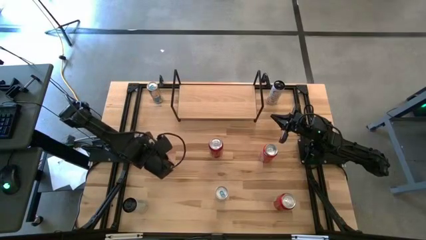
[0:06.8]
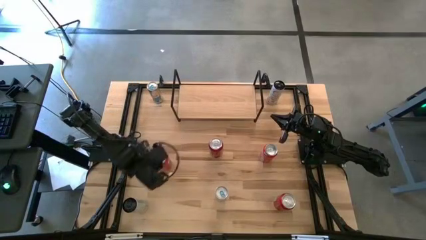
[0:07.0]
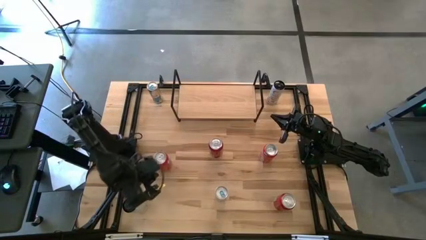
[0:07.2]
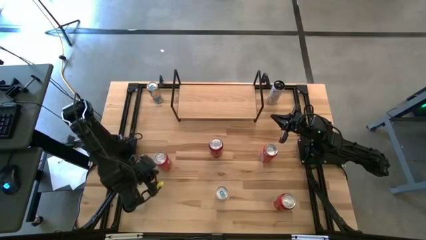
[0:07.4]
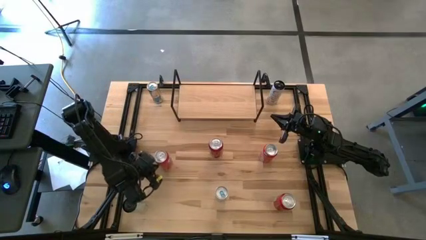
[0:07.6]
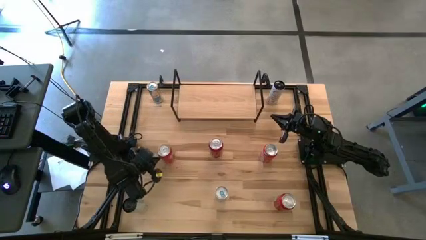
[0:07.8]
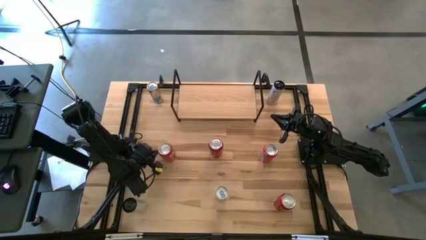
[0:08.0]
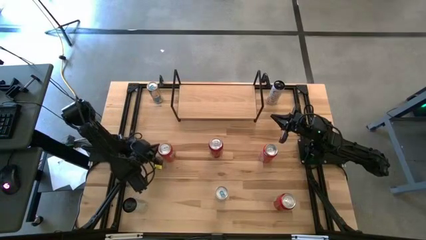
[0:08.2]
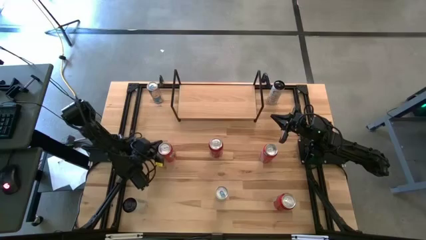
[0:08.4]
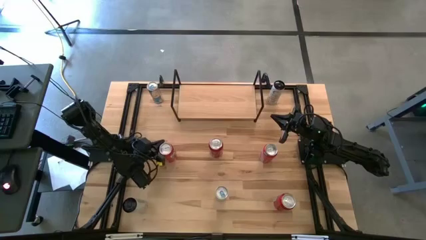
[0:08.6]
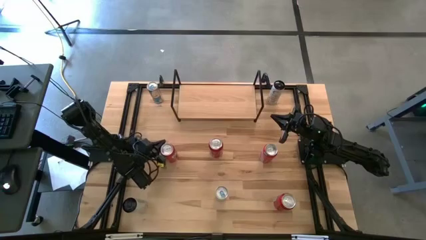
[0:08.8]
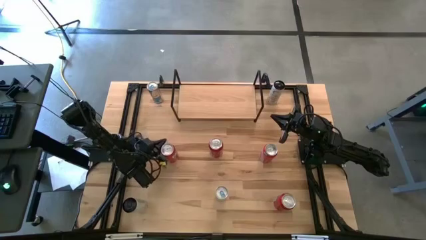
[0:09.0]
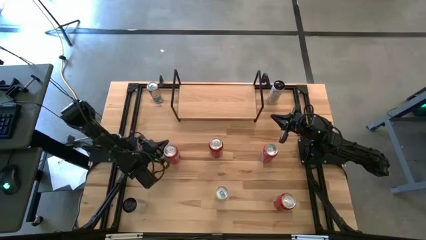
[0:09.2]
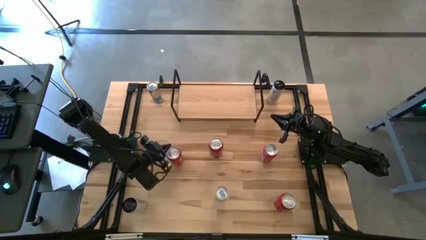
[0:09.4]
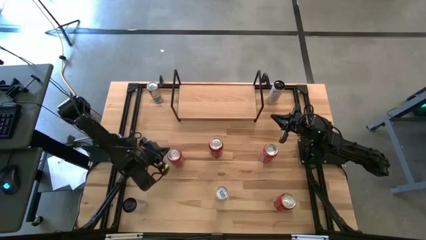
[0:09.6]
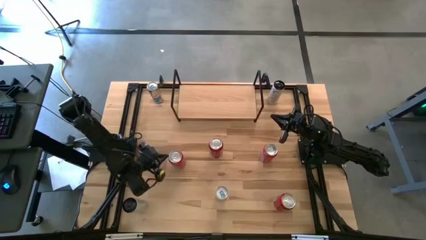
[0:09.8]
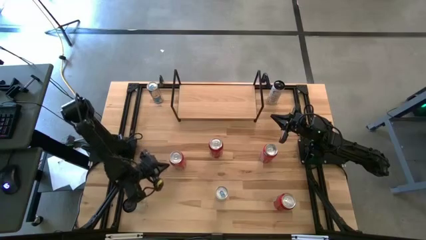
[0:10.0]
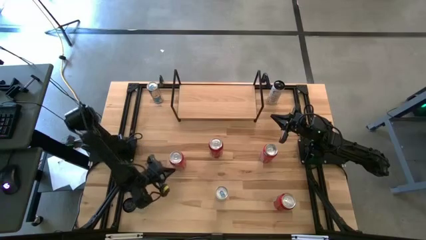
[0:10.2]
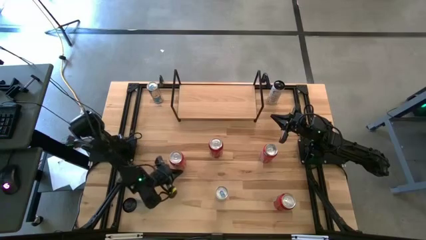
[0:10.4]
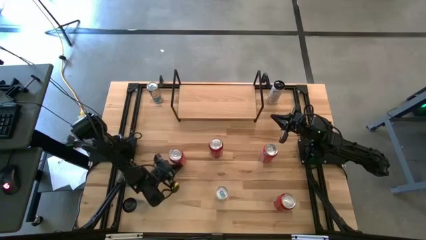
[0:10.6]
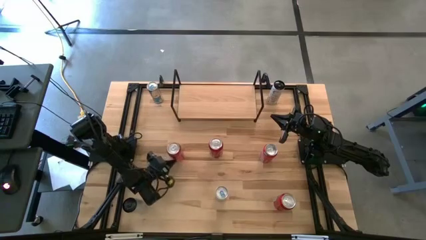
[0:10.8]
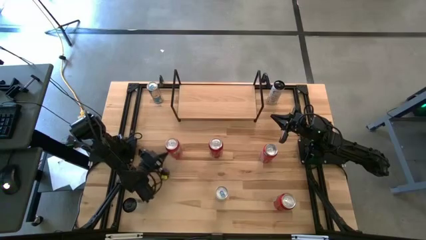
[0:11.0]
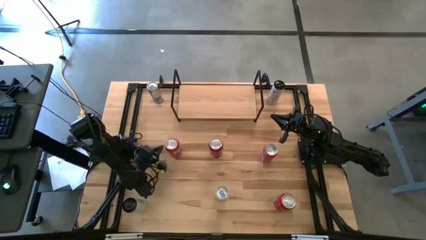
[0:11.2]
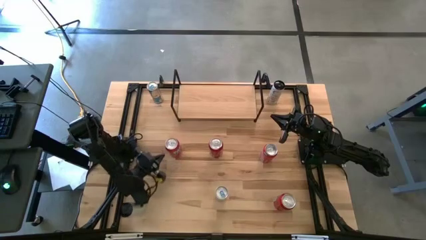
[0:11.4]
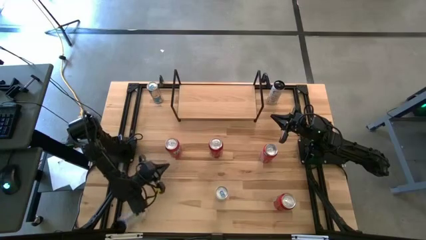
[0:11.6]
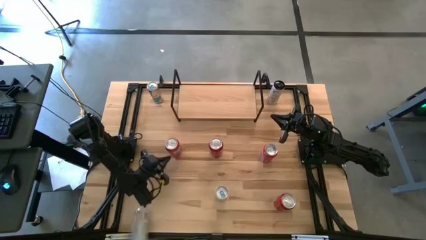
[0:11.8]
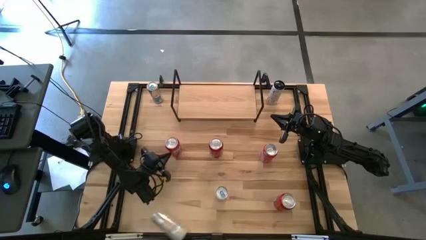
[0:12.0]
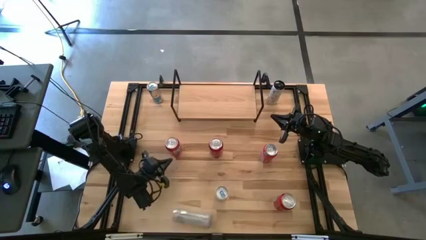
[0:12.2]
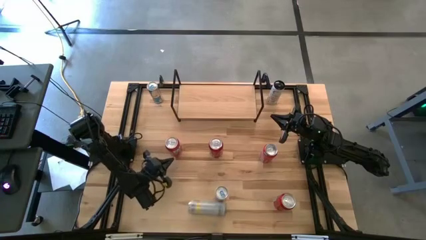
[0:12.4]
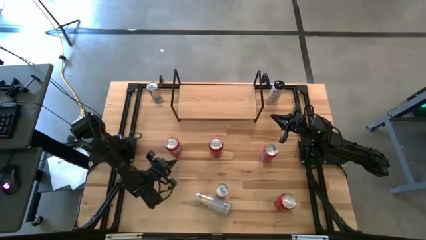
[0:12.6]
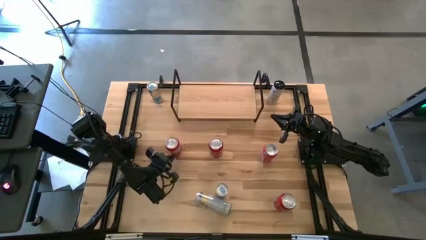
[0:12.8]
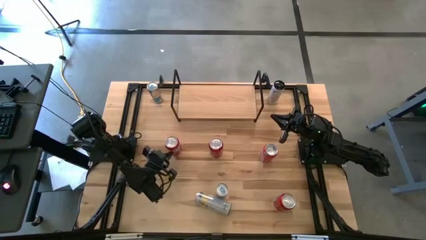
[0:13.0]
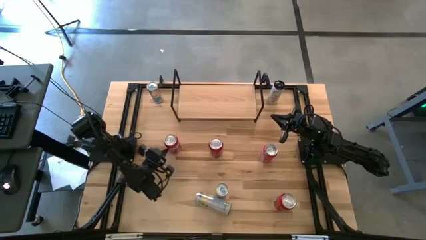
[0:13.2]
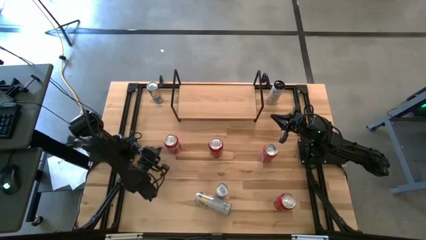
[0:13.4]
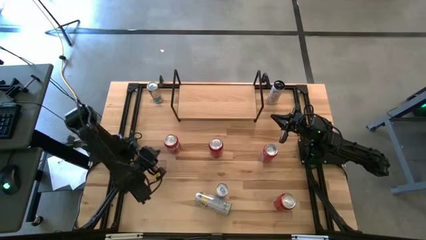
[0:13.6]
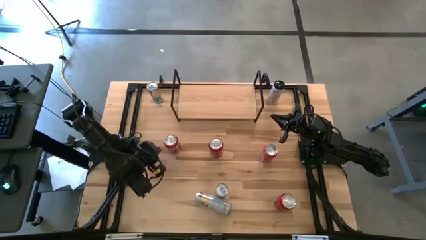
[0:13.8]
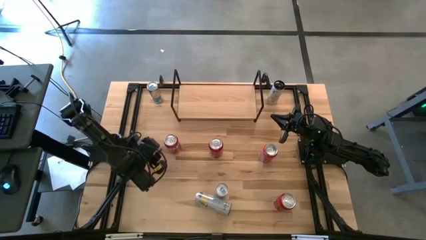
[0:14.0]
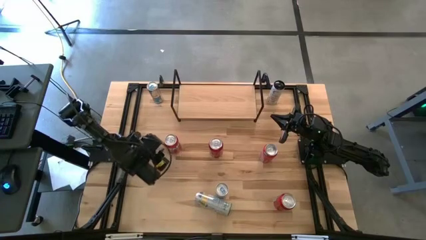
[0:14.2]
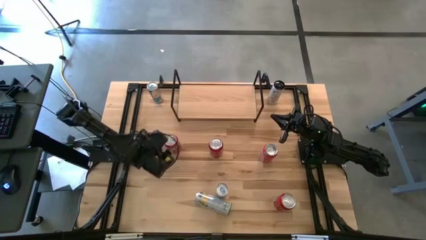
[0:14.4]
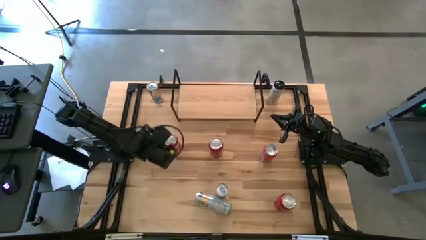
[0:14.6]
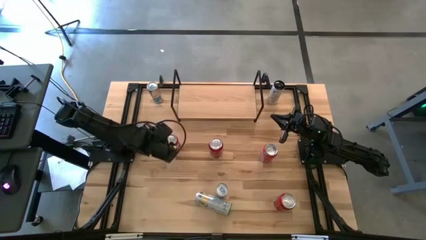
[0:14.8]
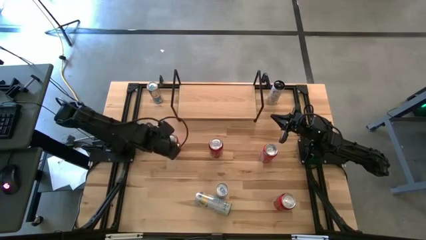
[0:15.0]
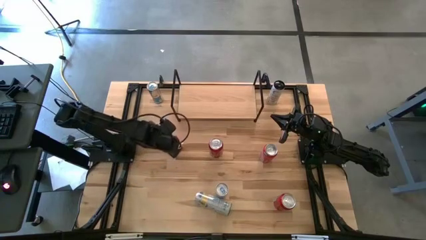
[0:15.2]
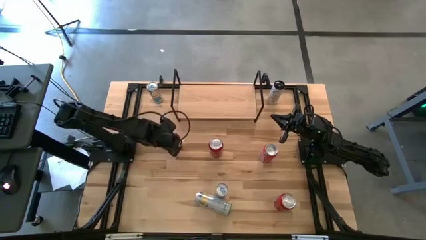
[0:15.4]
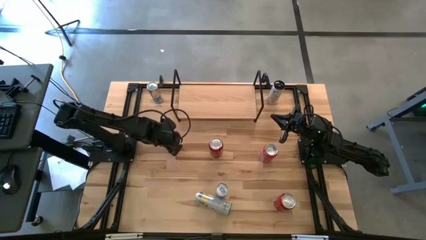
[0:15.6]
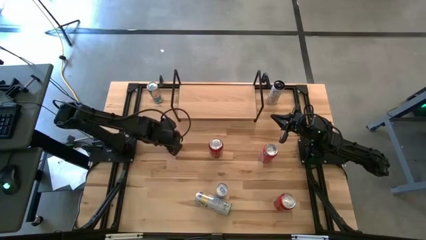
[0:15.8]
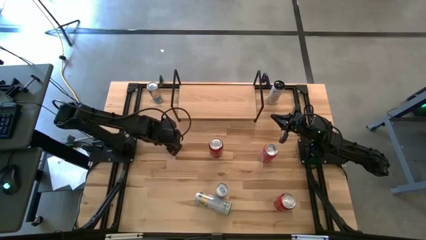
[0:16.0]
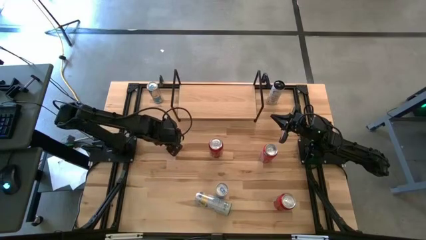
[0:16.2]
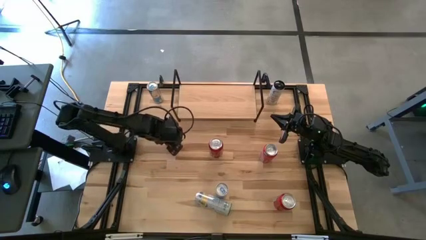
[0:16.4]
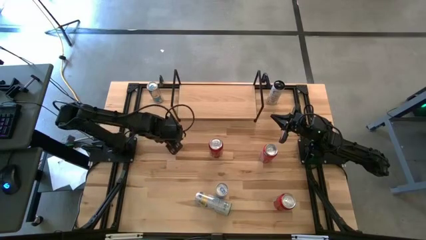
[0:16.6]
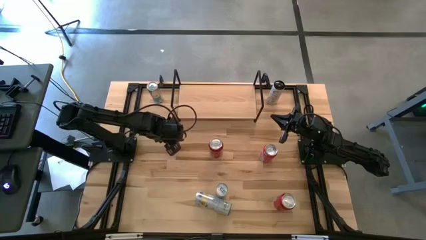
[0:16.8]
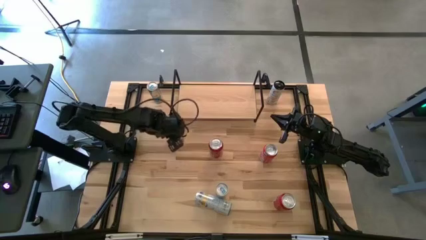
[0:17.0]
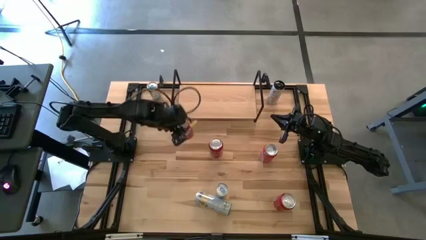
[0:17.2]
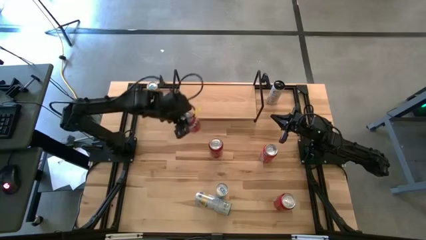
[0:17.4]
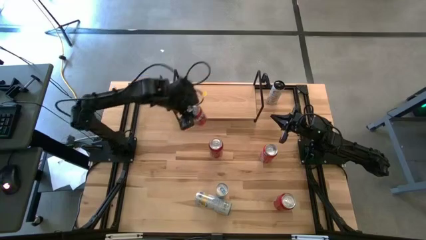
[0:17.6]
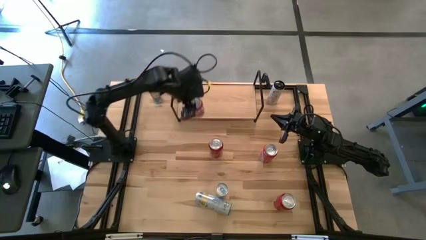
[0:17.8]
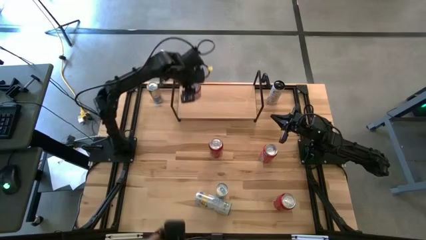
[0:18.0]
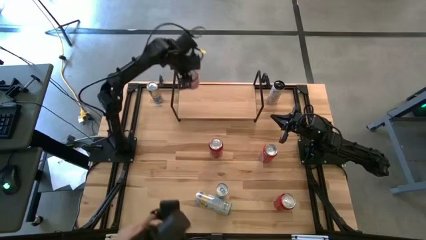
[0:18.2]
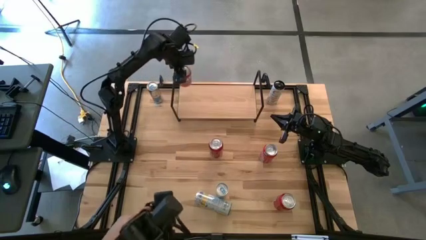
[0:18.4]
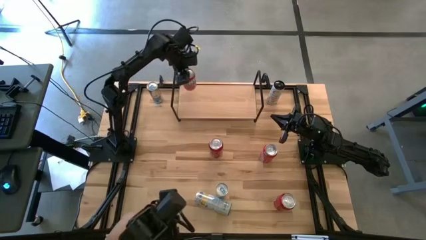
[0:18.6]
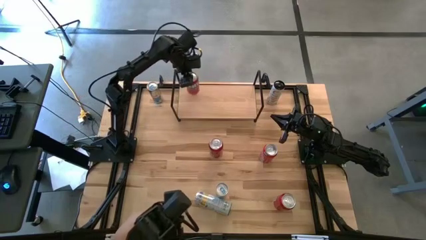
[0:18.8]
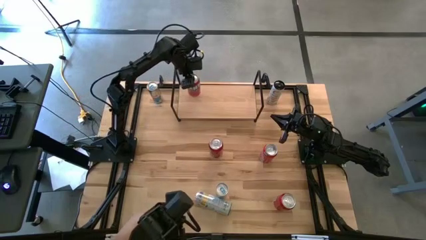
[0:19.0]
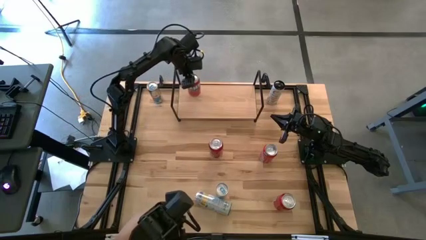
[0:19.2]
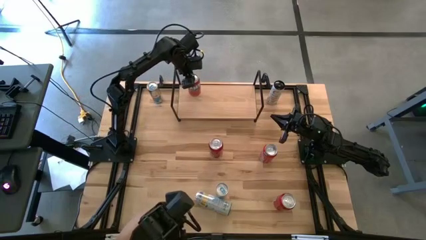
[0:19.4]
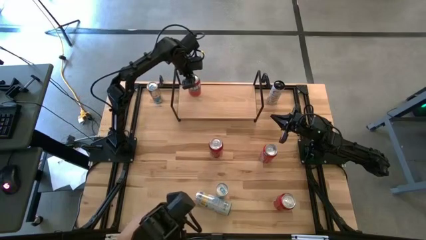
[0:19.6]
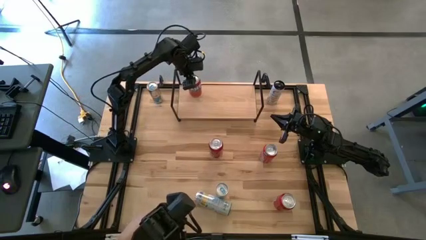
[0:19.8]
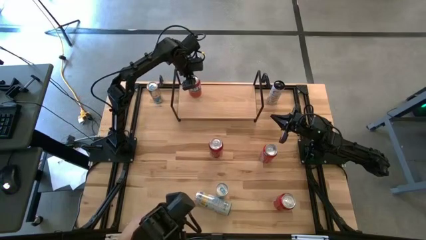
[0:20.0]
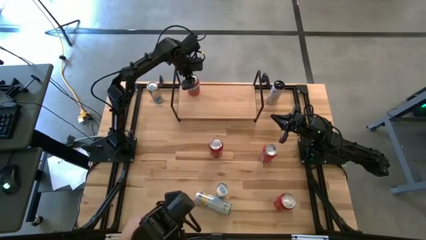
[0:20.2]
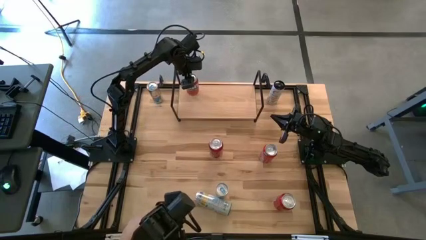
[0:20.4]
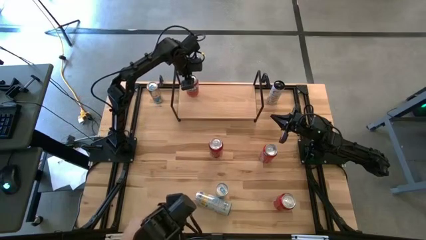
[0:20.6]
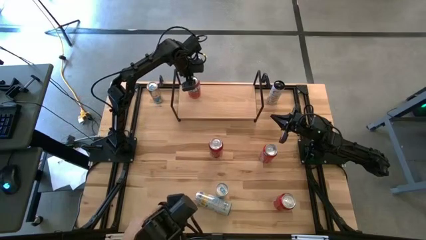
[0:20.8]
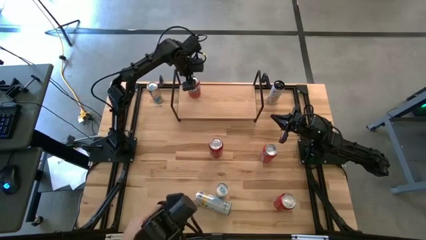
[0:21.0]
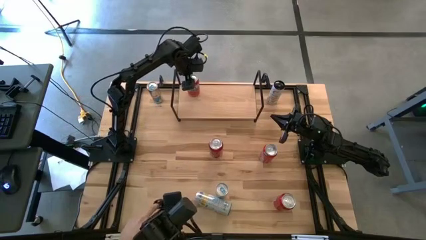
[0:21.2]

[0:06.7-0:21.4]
Task: Place canned beverage on shelf
Put the left red soda can on the shelf
